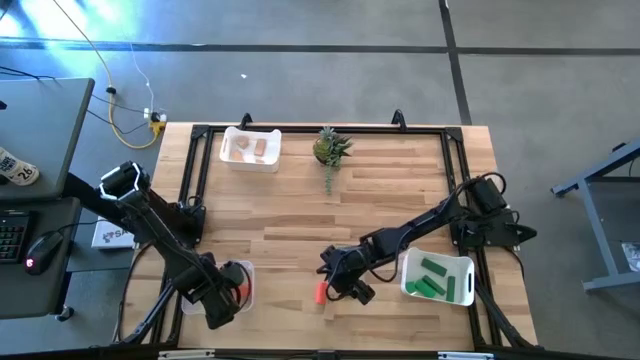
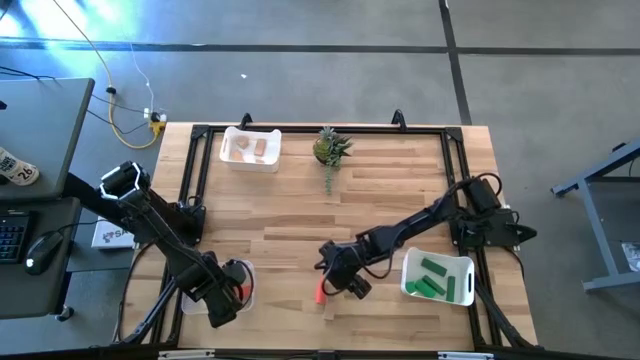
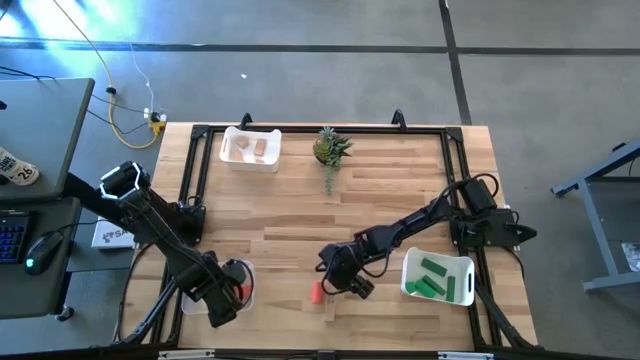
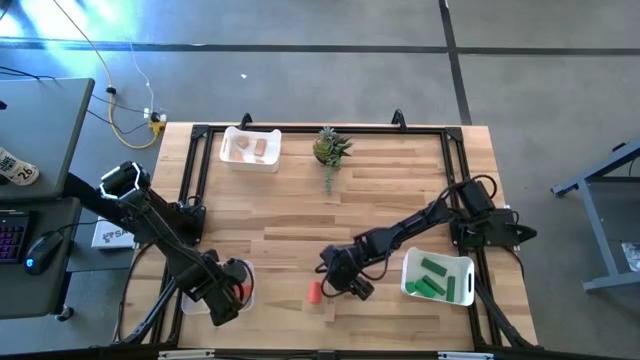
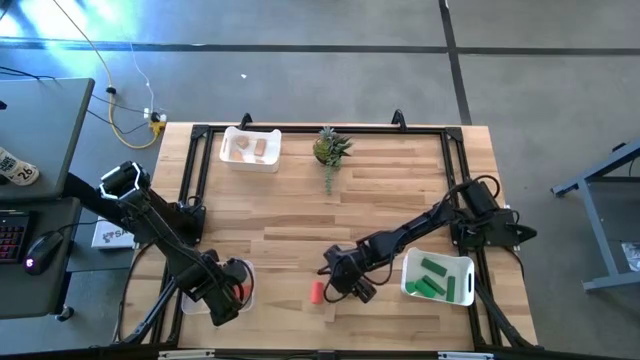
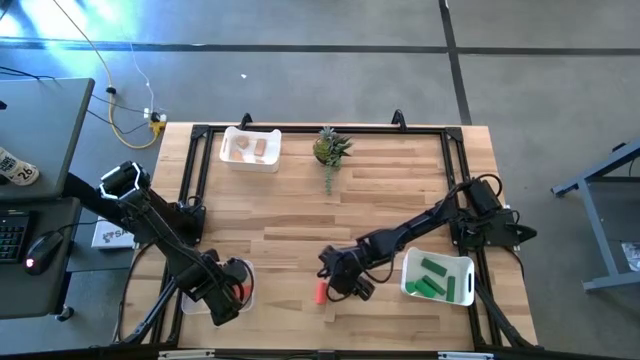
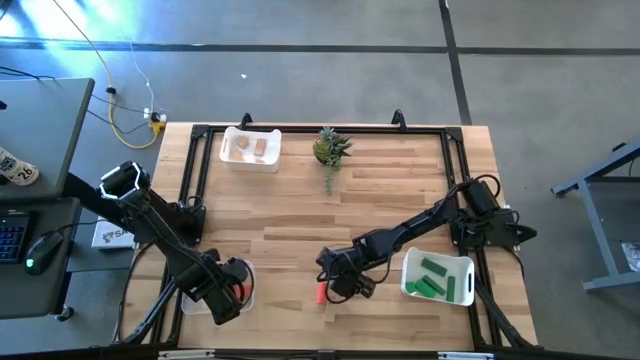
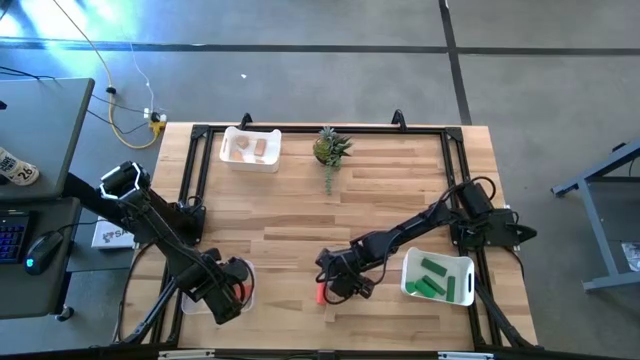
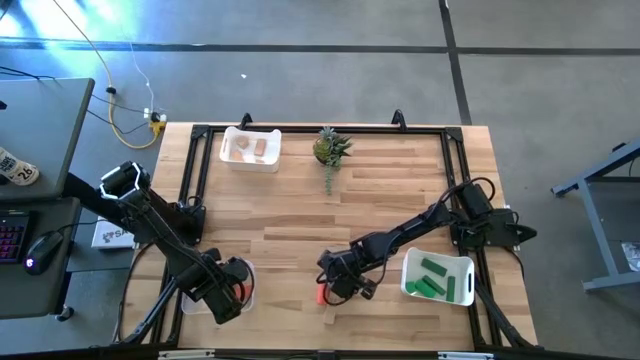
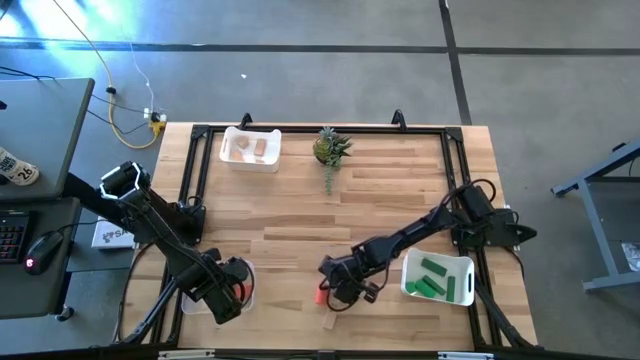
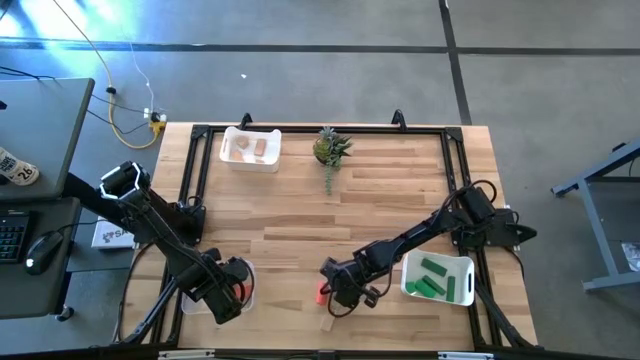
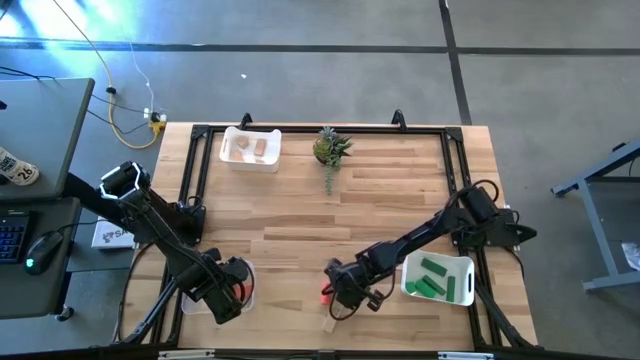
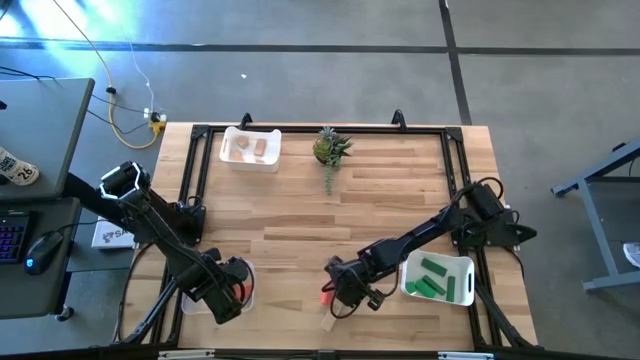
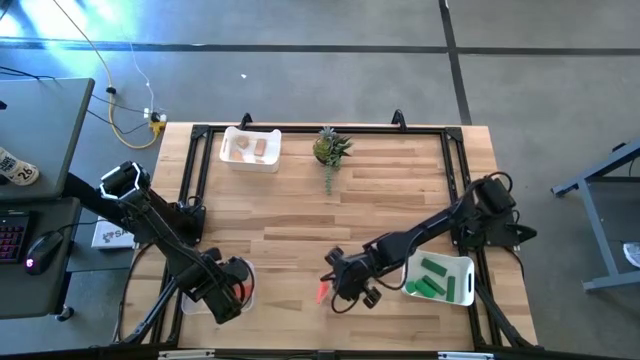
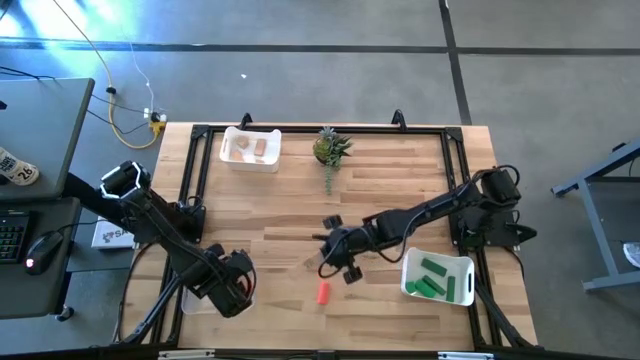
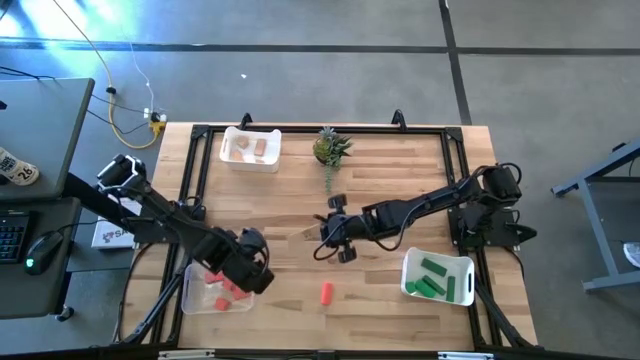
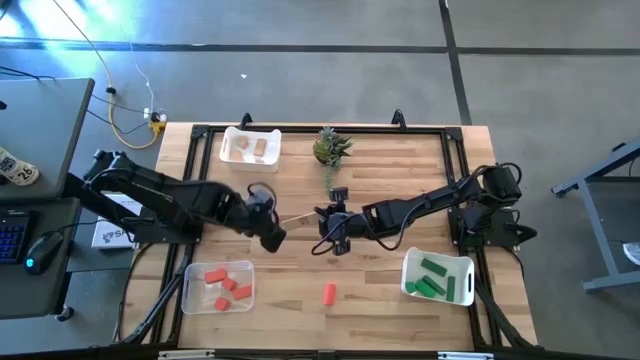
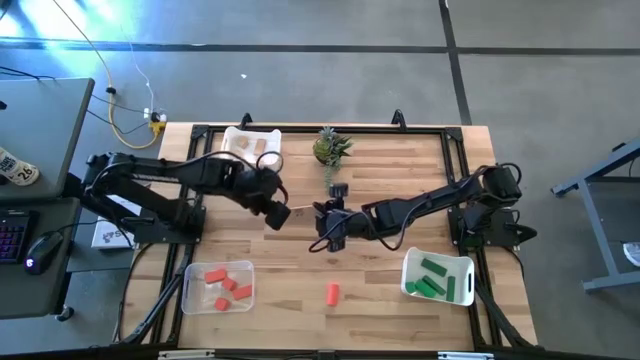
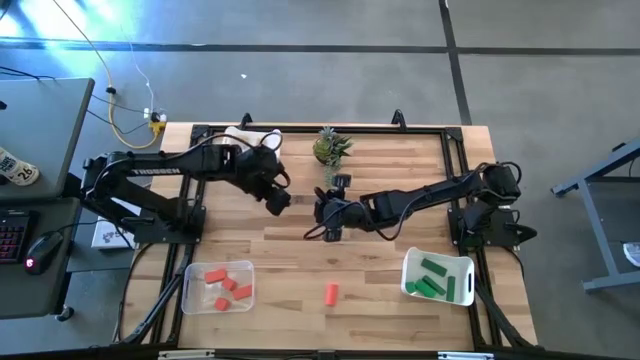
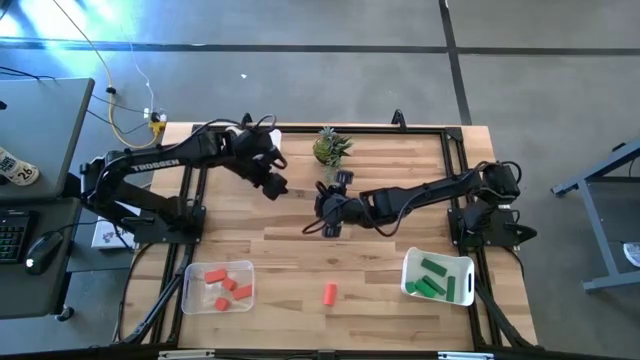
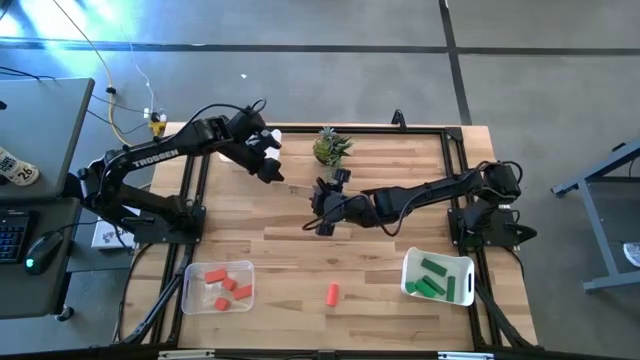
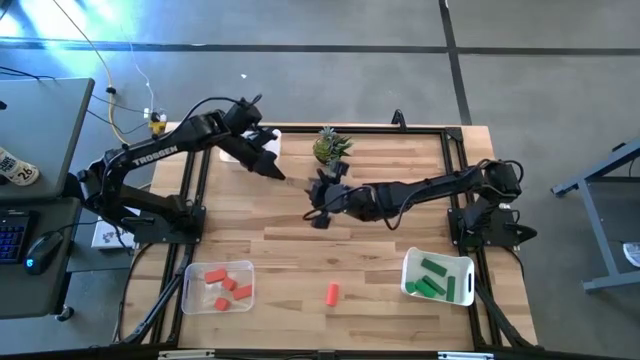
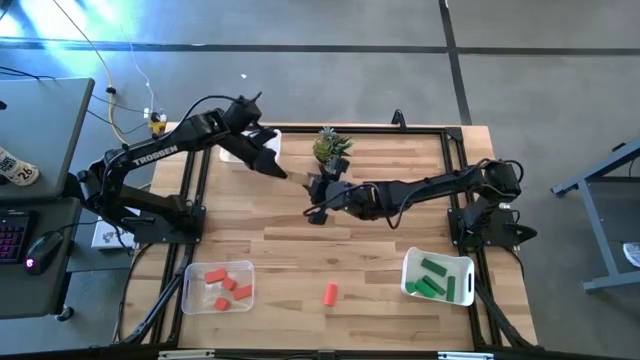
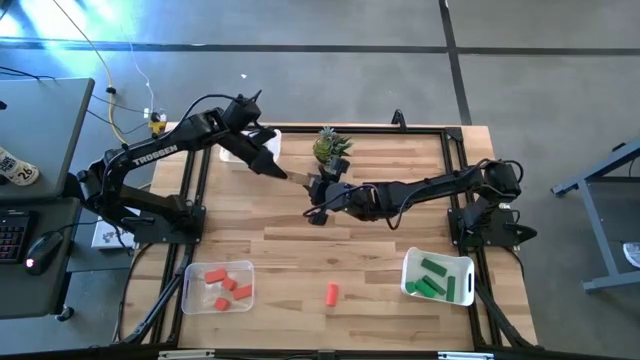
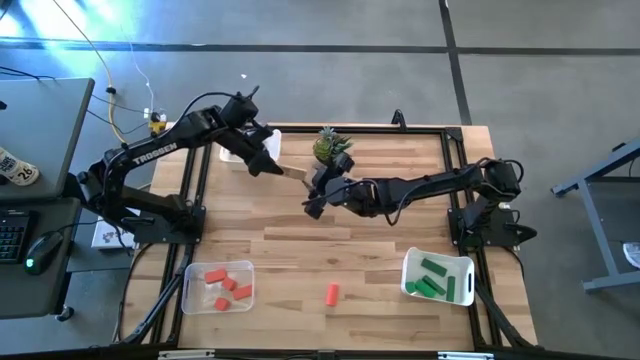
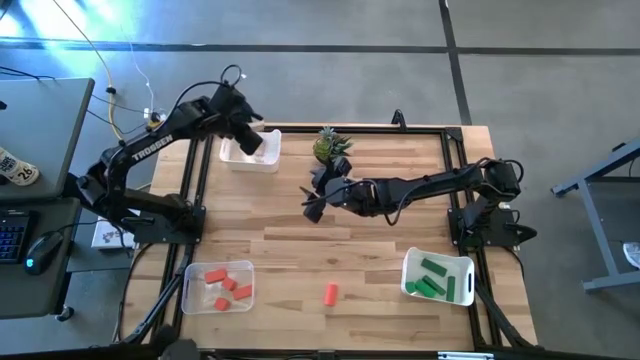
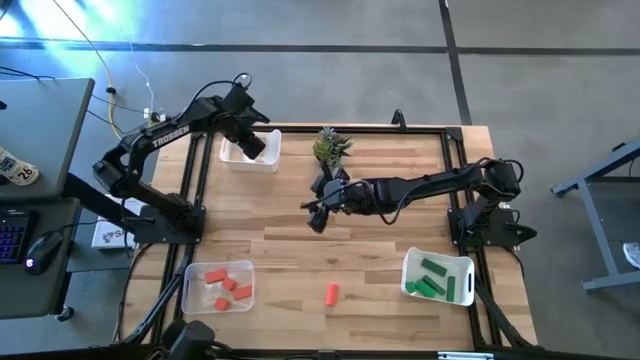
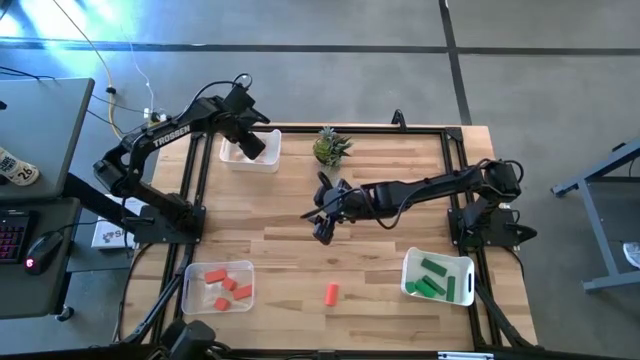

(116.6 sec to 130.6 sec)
Task: Sort & place blocks by color
Put the brown block into the top white bin

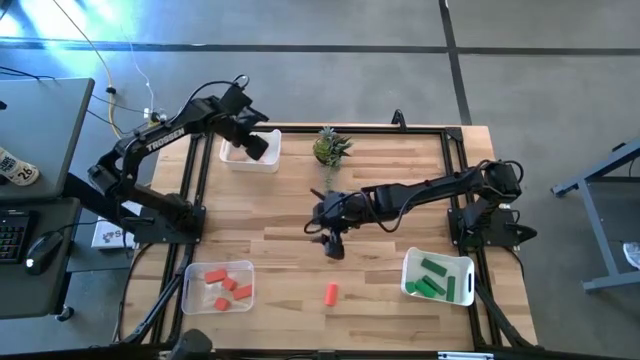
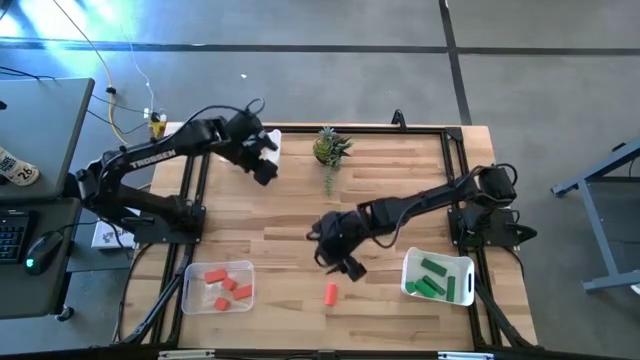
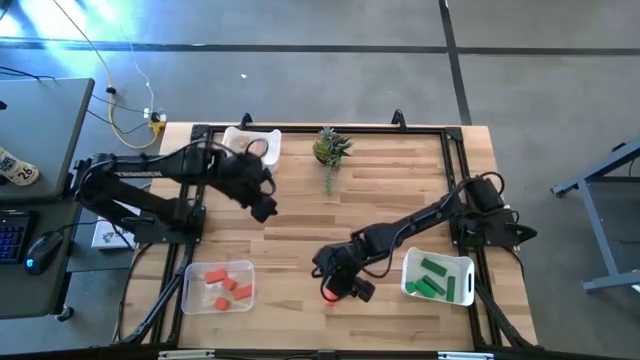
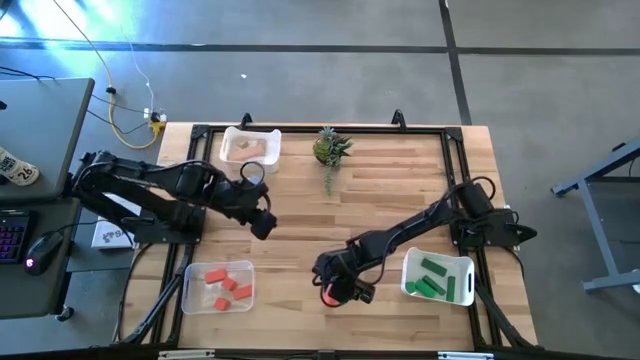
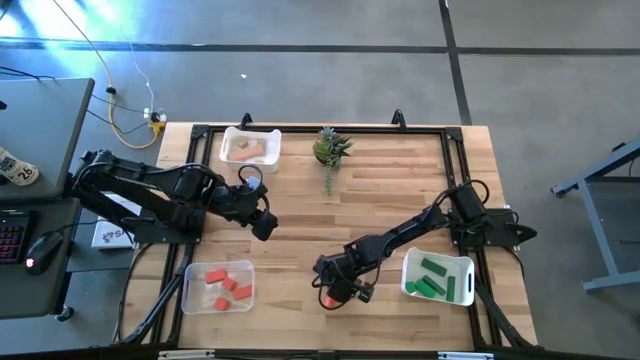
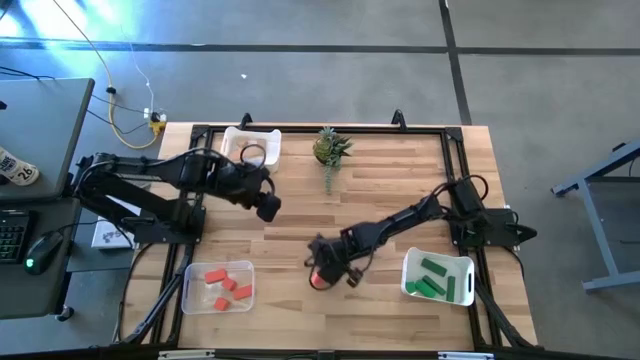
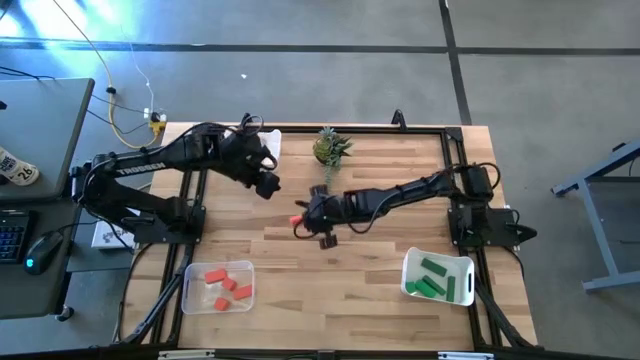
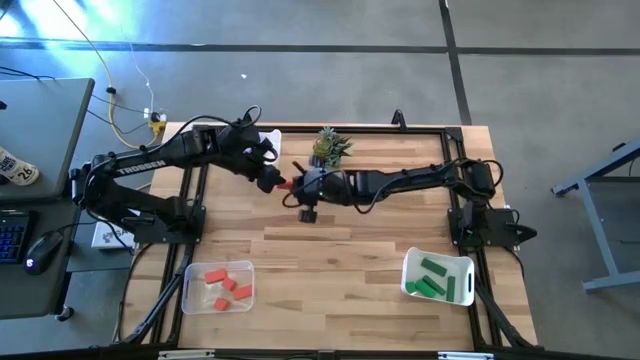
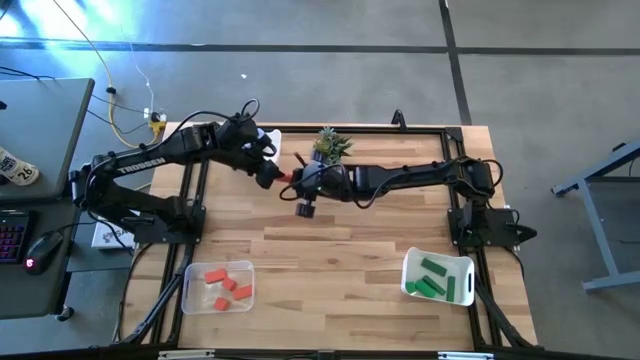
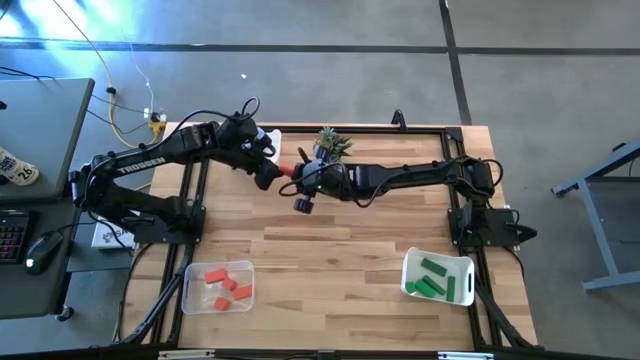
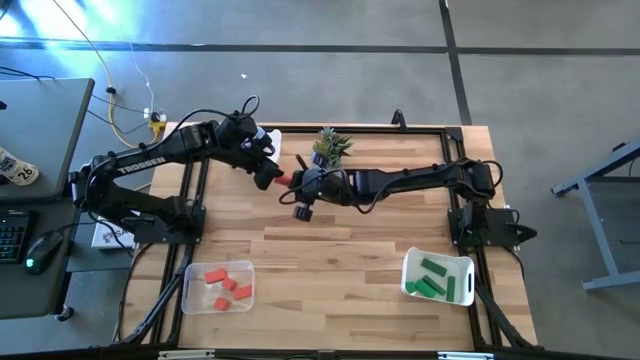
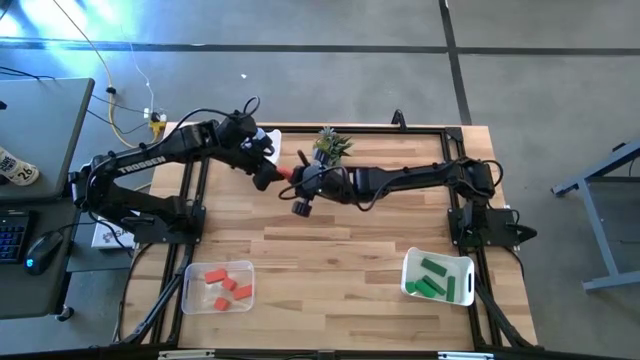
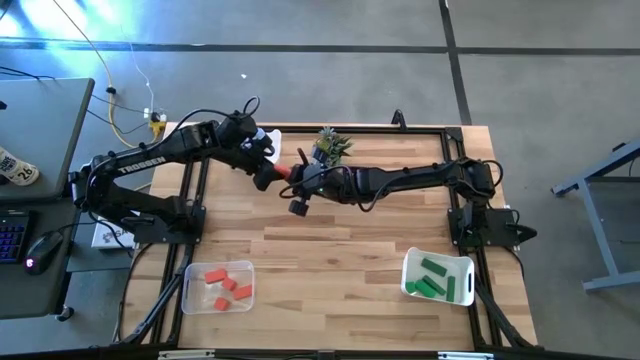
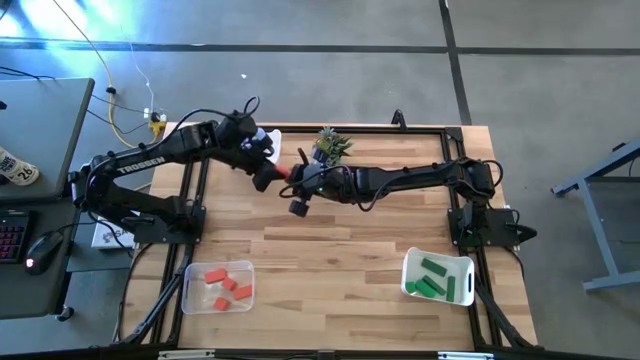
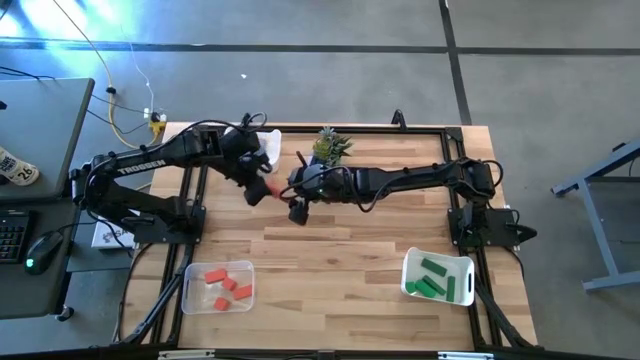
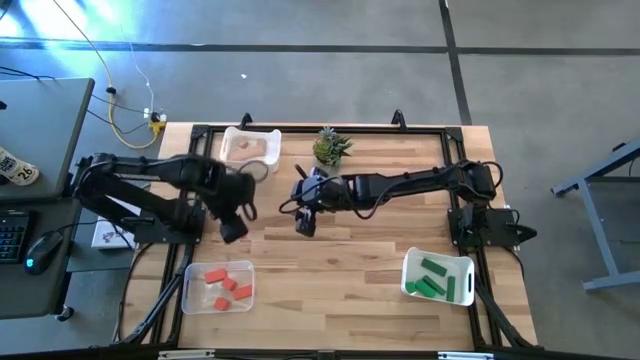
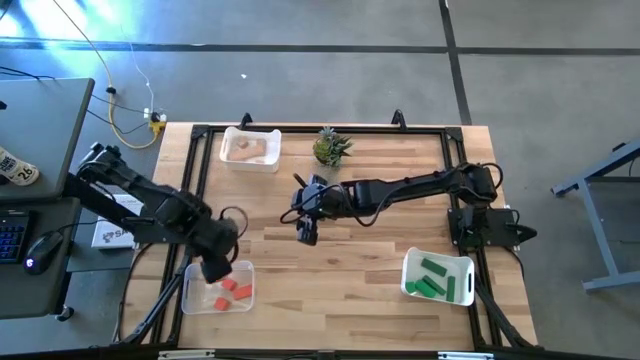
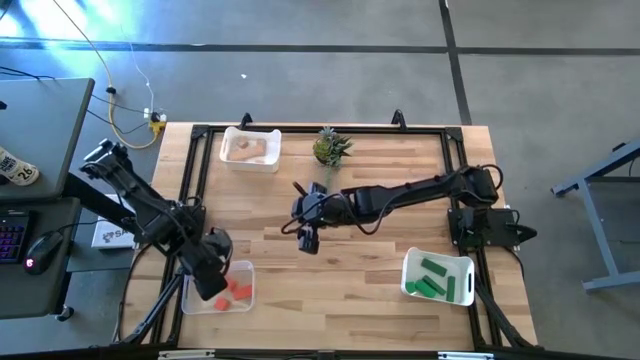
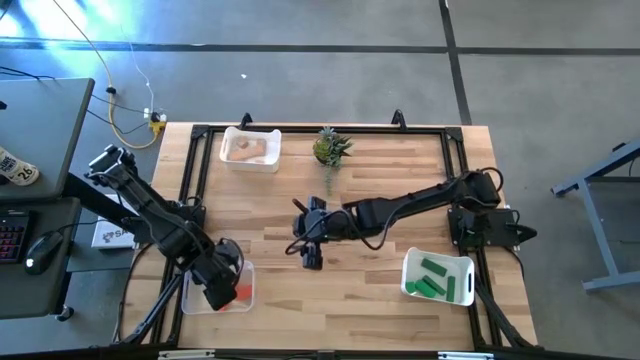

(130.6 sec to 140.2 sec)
Put the orange block into the transparent bin
